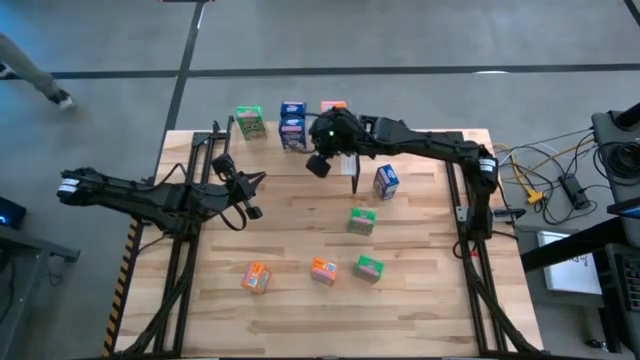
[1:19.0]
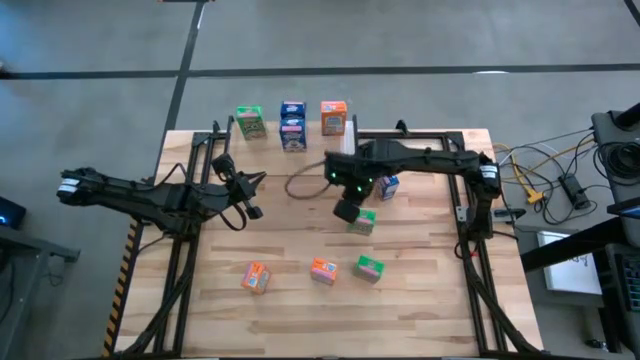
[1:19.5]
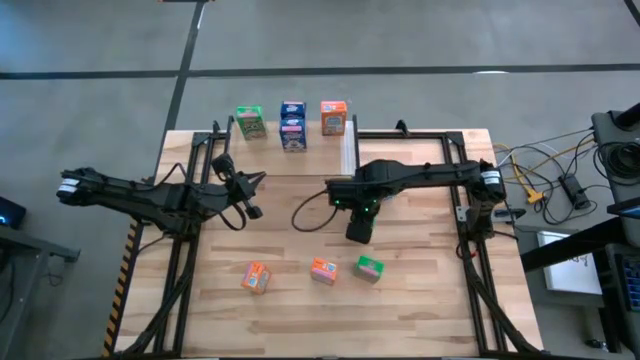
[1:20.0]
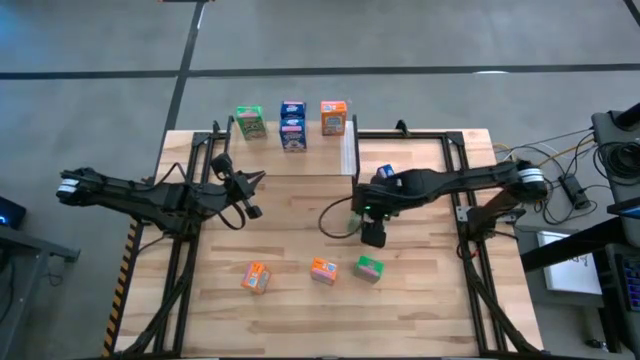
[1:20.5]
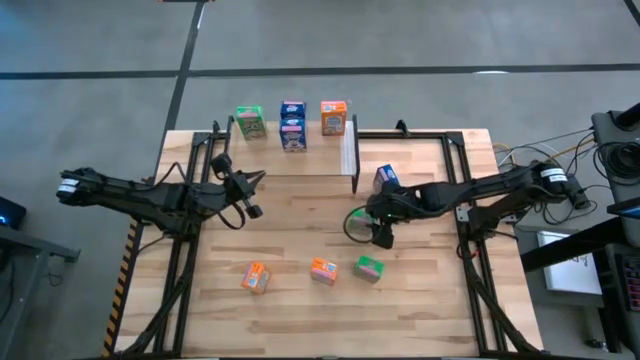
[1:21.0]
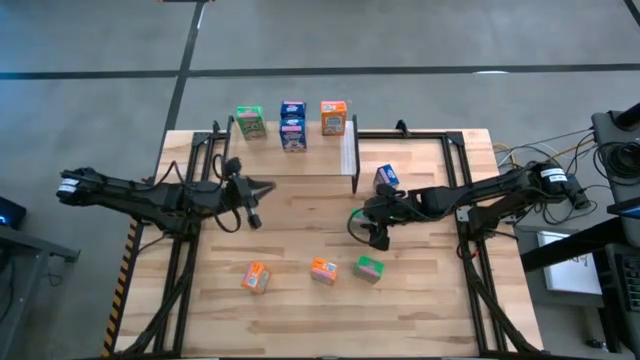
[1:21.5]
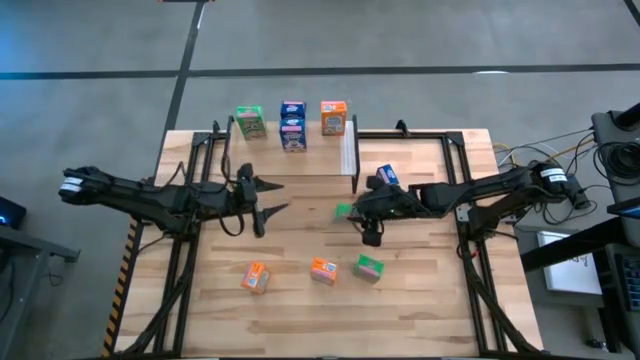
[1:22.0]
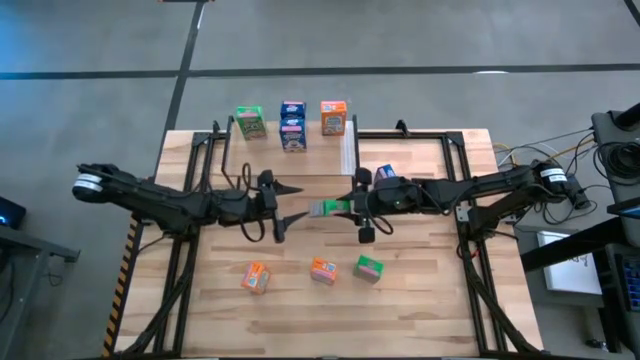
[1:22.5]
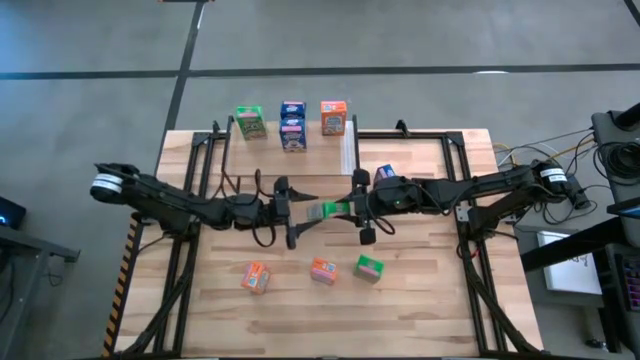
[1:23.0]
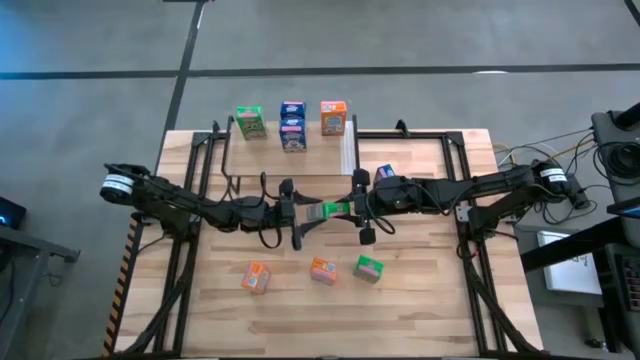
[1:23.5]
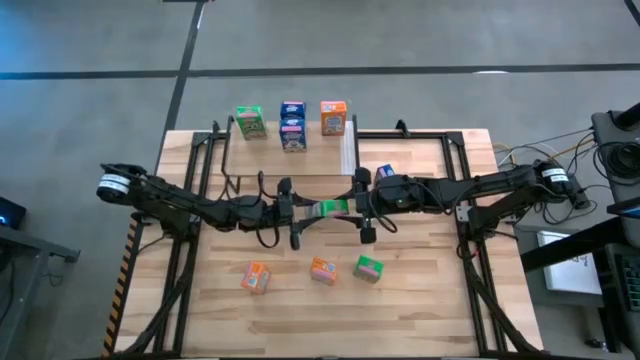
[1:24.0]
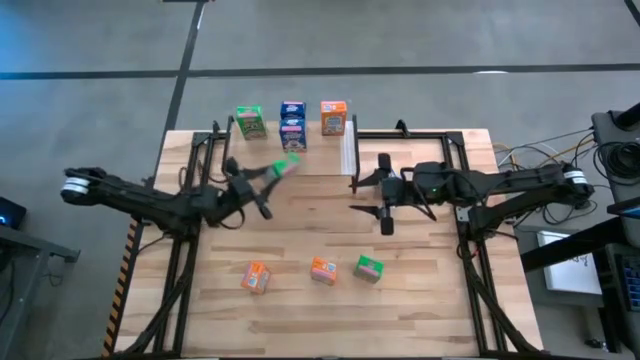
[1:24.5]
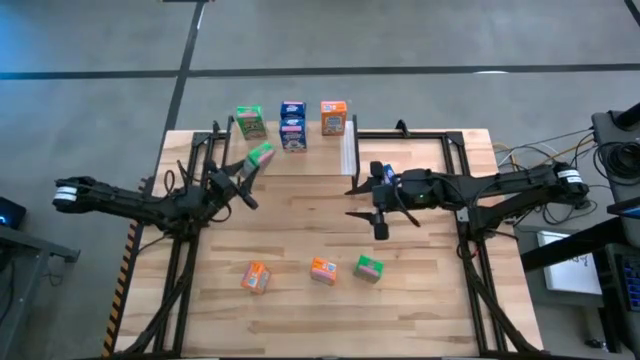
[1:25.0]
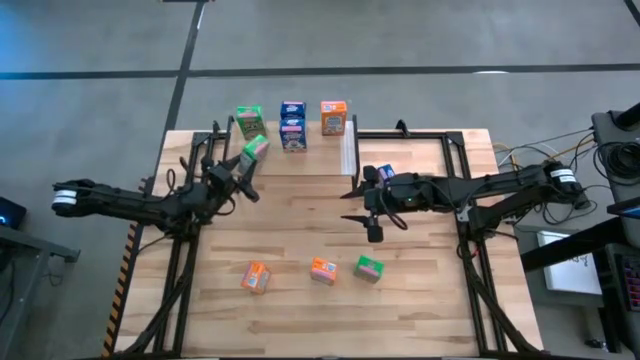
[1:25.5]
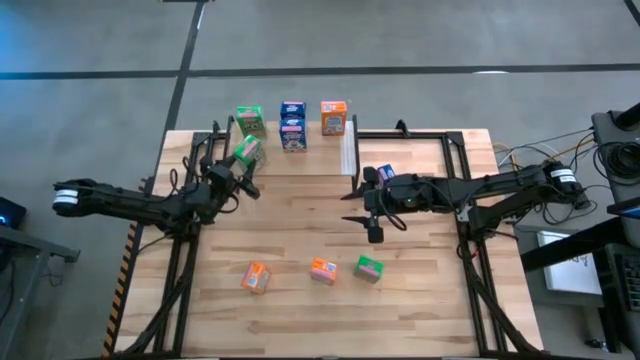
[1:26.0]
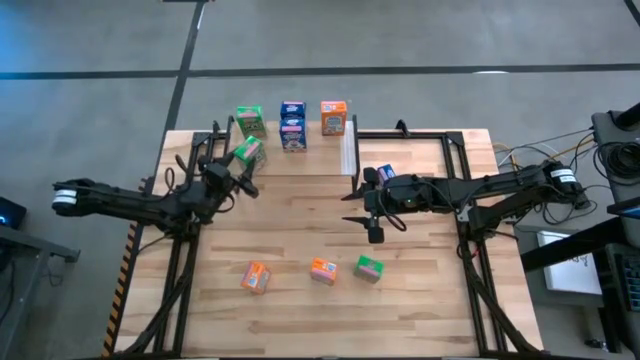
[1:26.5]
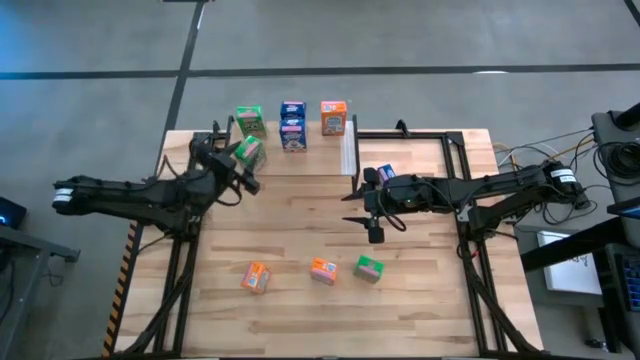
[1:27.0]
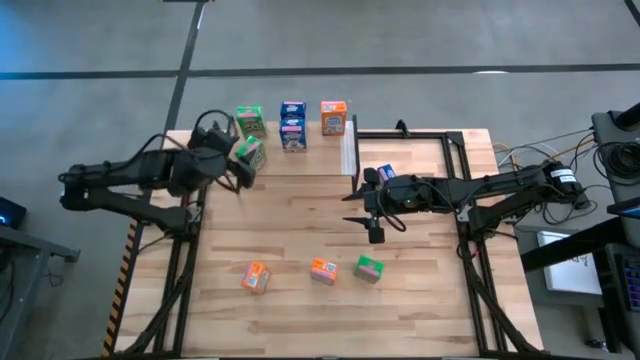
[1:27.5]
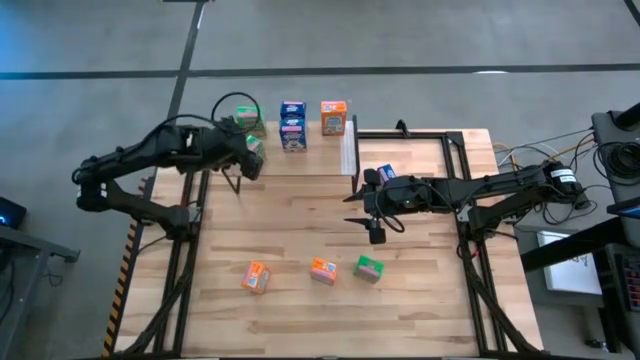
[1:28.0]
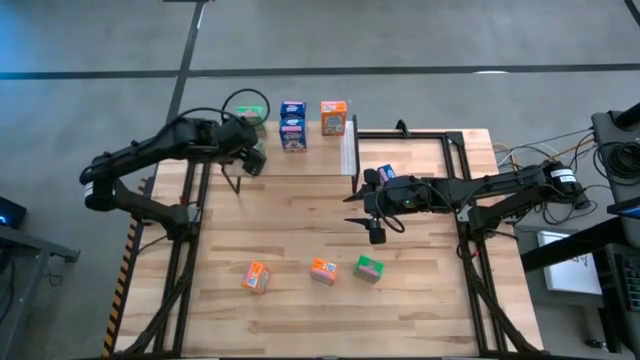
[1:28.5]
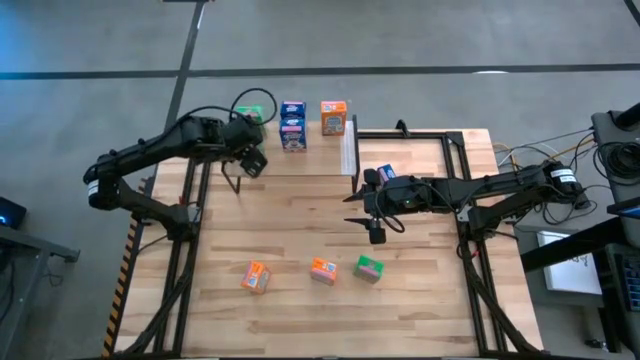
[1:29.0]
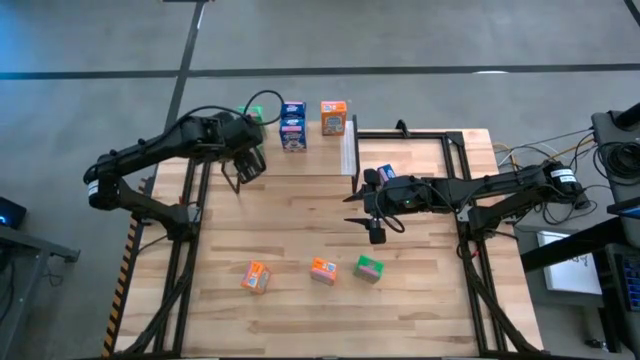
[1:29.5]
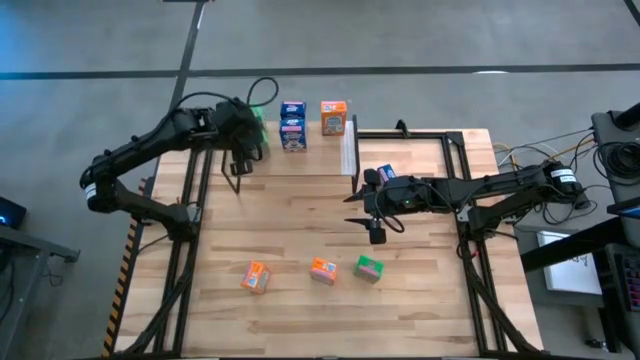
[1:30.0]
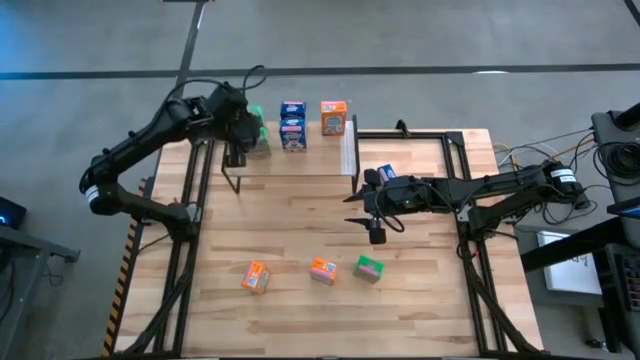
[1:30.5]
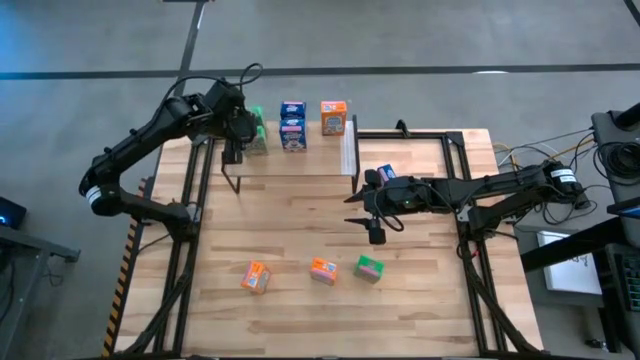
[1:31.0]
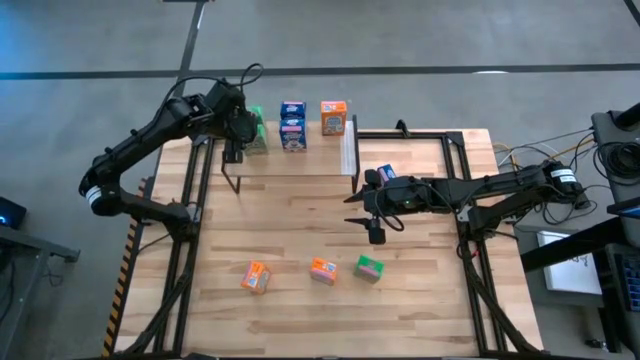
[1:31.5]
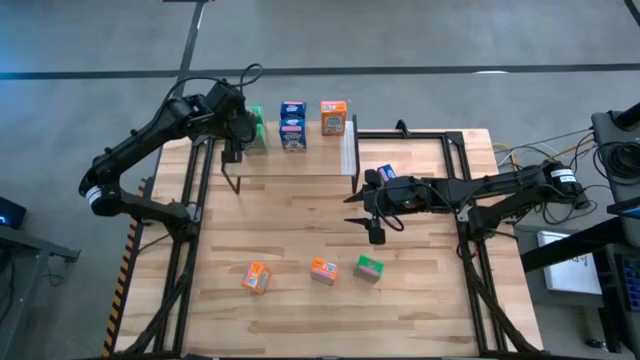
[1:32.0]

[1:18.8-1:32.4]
Task: Stack cereal on shelf
Put the top green cereal box on the shelf aligned with the other green cereal box

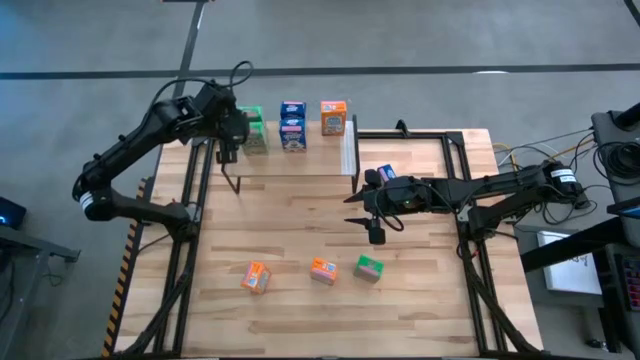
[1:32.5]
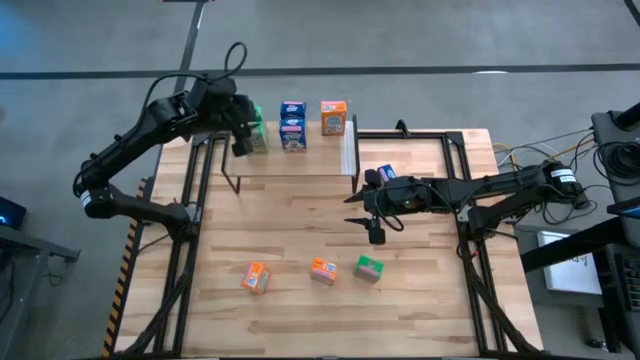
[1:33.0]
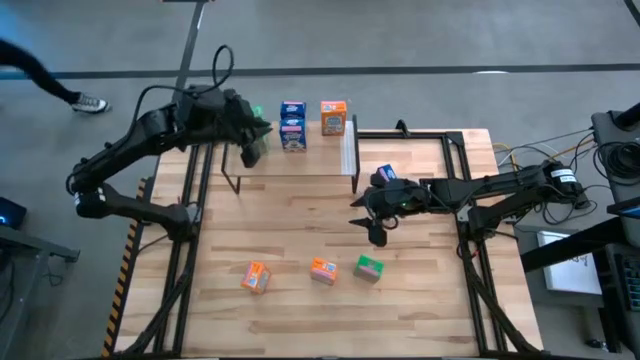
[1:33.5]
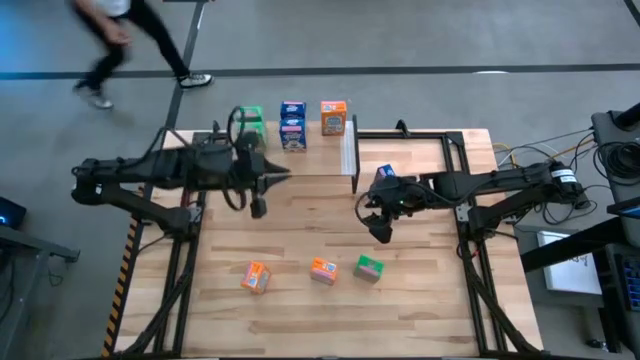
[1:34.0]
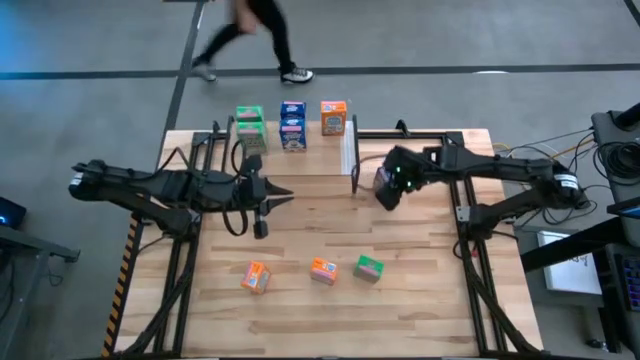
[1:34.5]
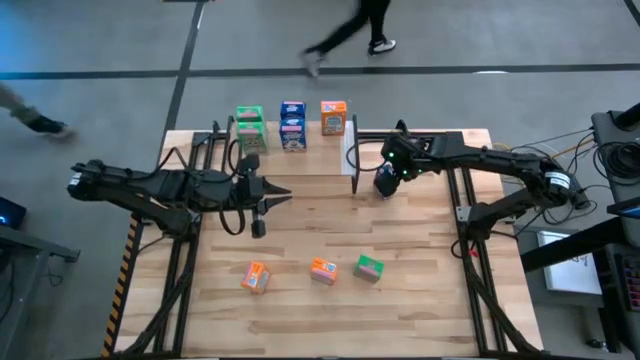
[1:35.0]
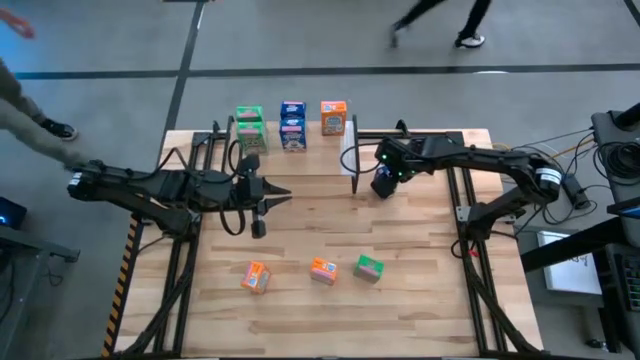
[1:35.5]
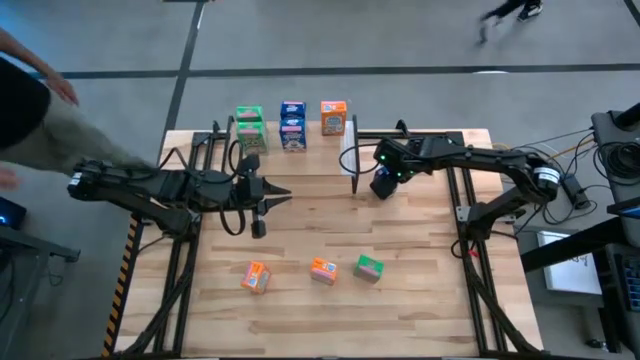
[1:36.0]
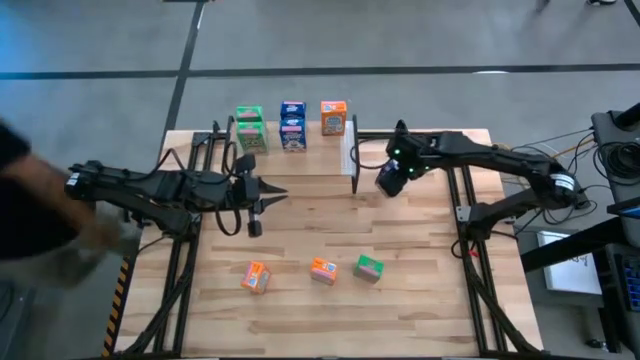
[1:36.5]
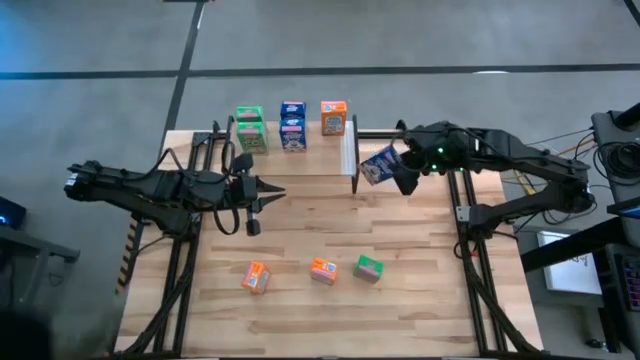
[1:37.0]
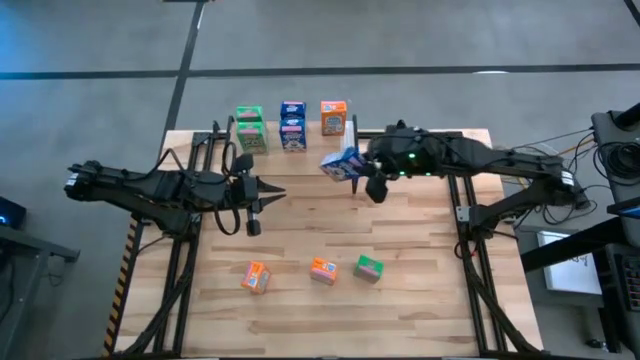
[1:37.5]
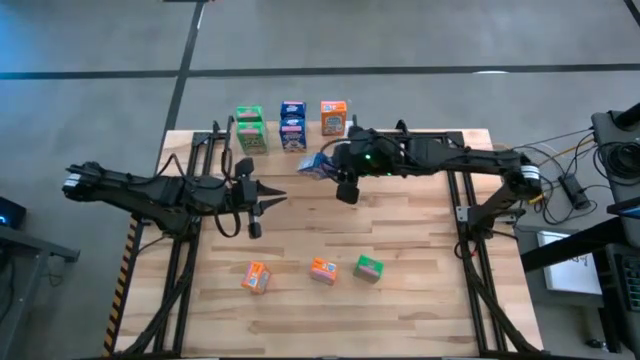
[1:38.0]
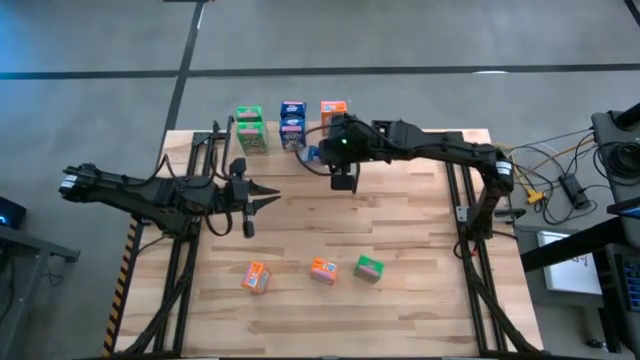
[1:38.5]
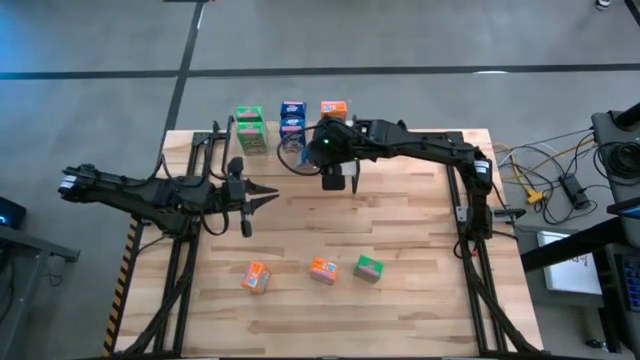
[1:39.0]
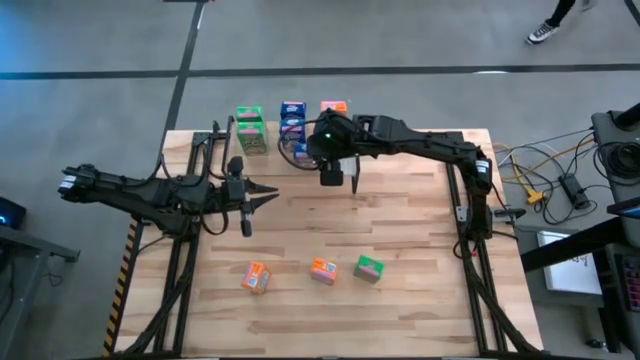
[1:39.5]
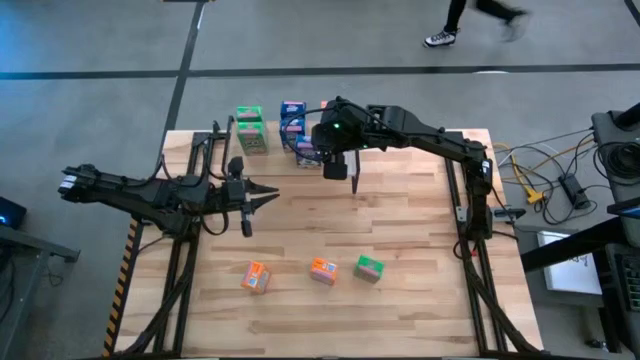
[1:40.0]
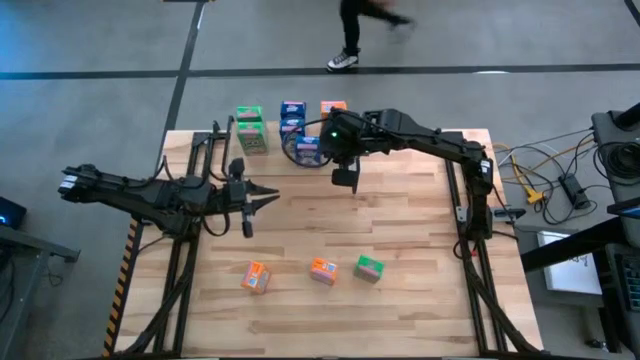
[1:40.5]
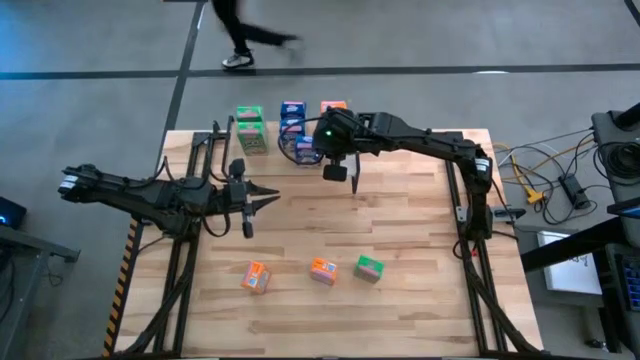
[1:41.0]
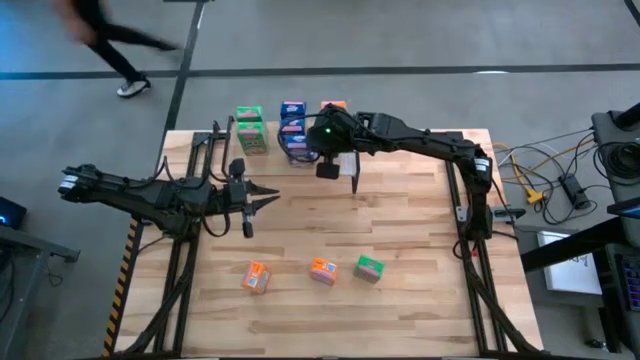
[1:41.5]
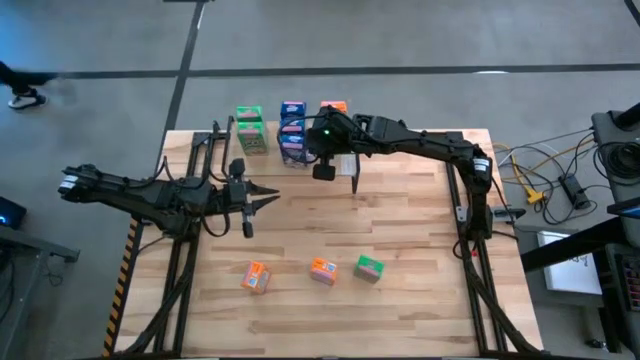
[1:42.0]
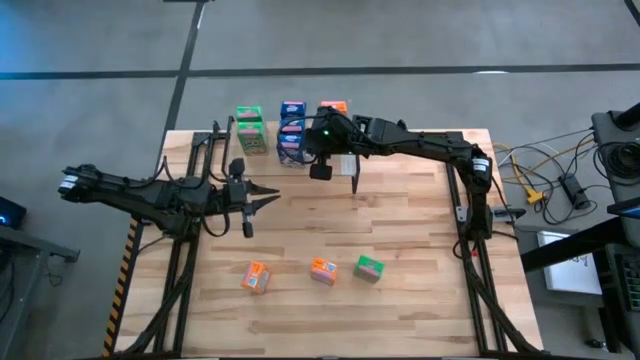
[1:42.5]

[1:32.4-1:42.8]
Put the blue cereal box on the shelf aligned with the other blue cereal boxes
